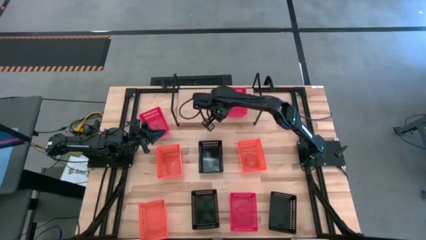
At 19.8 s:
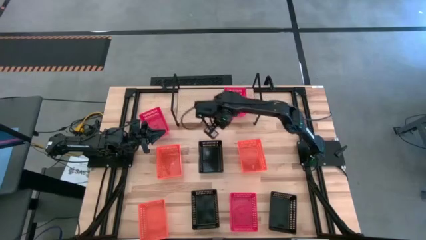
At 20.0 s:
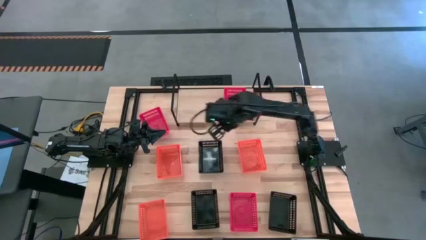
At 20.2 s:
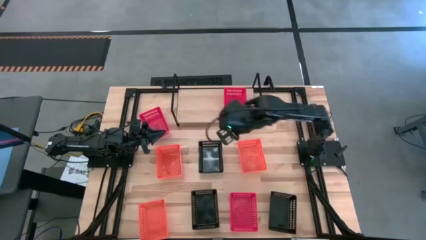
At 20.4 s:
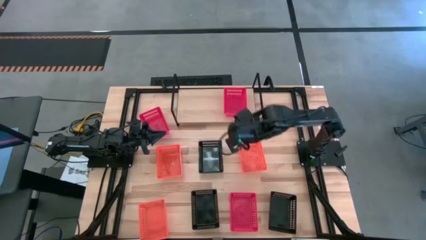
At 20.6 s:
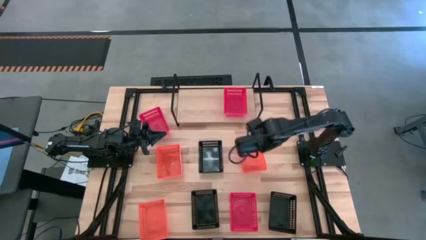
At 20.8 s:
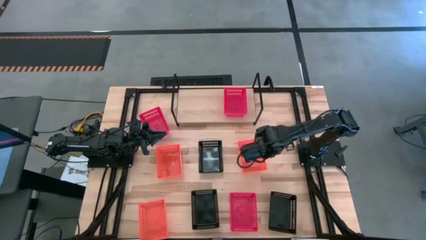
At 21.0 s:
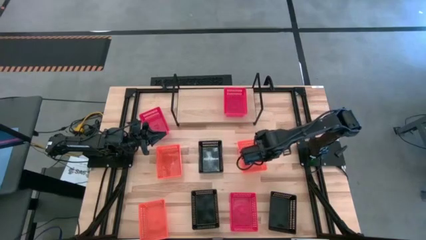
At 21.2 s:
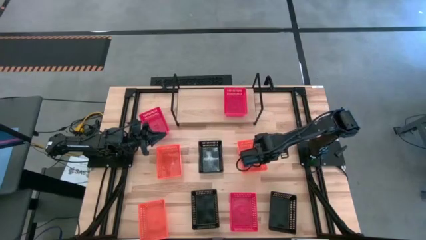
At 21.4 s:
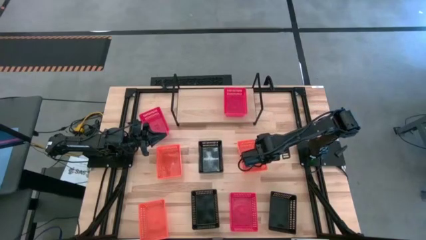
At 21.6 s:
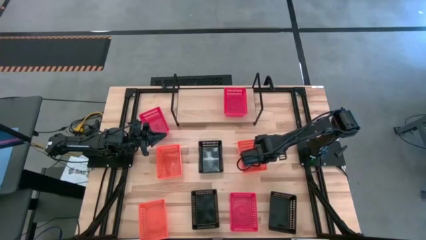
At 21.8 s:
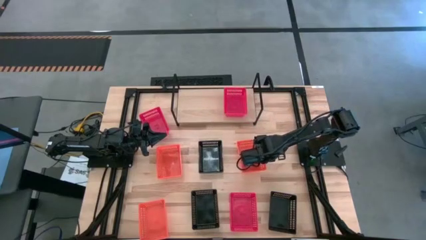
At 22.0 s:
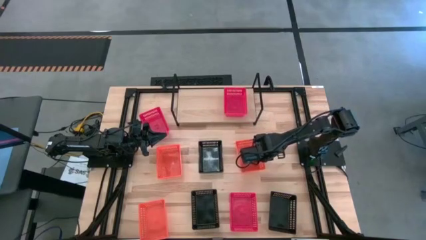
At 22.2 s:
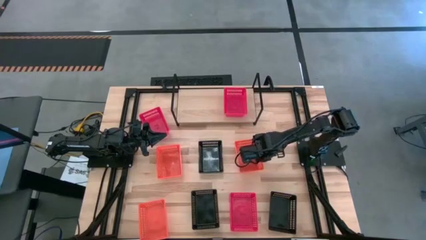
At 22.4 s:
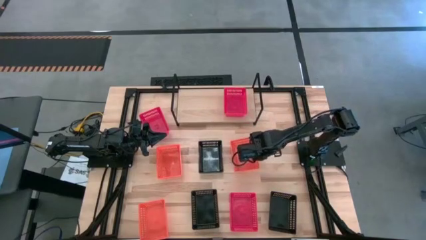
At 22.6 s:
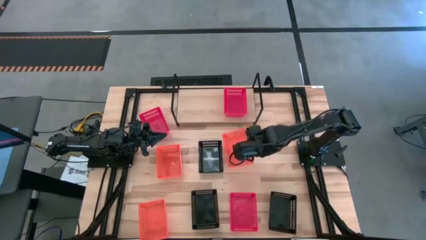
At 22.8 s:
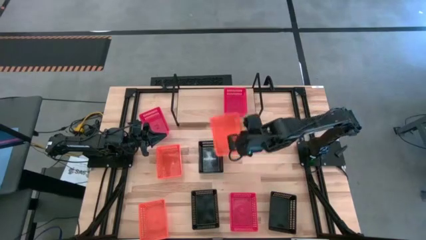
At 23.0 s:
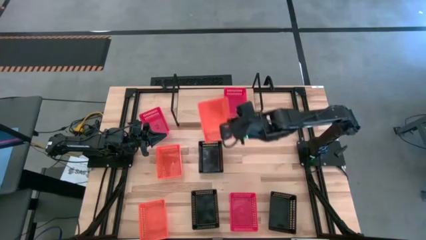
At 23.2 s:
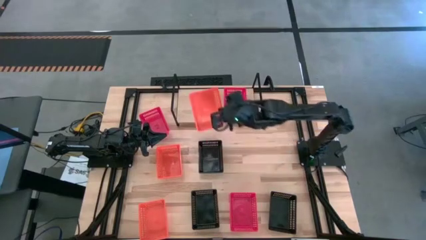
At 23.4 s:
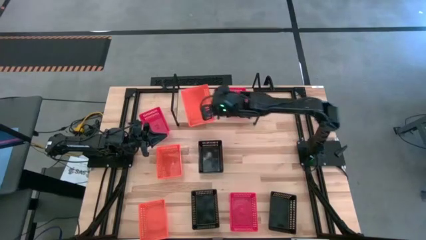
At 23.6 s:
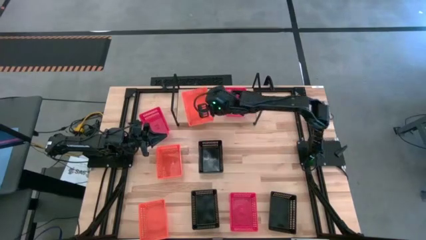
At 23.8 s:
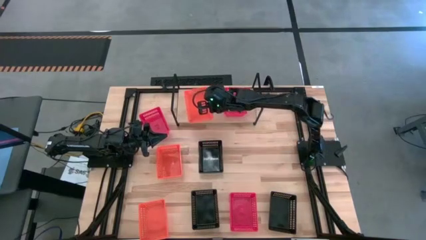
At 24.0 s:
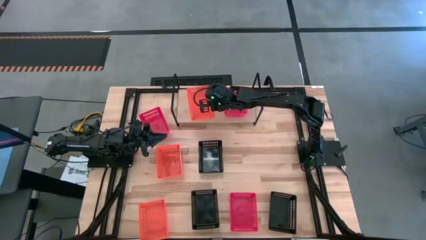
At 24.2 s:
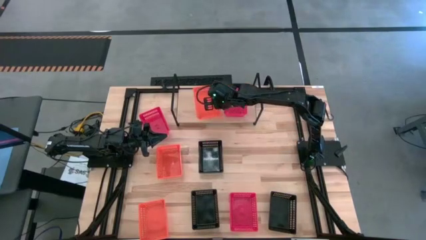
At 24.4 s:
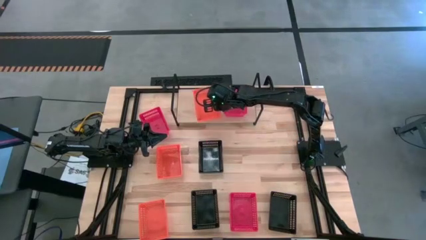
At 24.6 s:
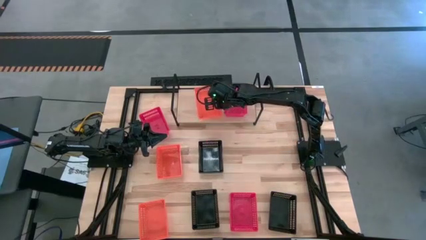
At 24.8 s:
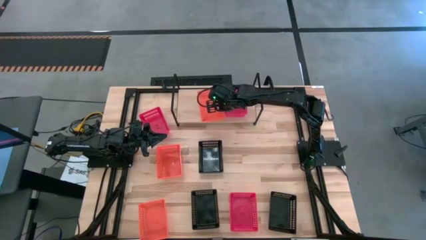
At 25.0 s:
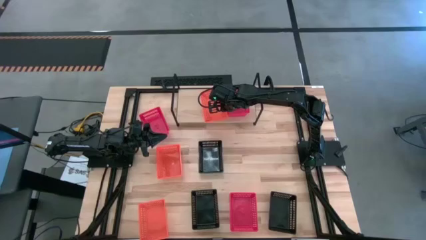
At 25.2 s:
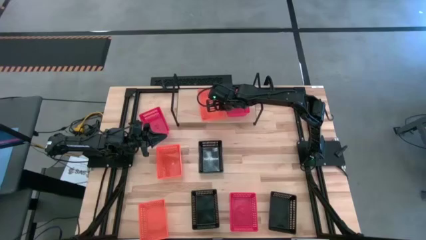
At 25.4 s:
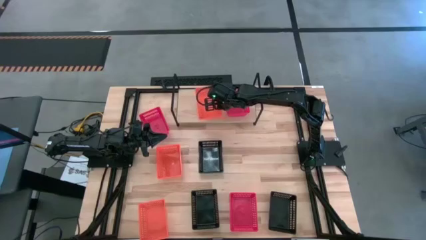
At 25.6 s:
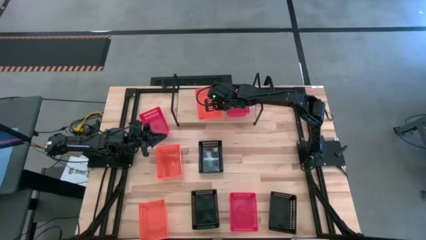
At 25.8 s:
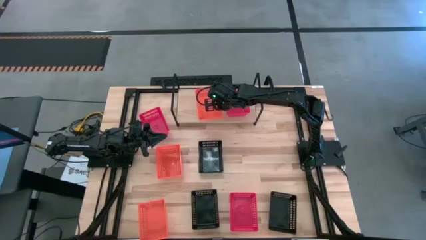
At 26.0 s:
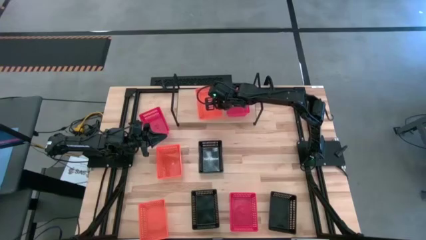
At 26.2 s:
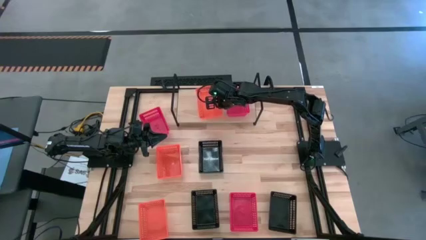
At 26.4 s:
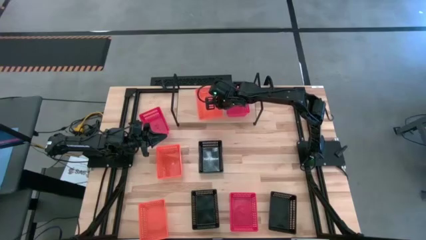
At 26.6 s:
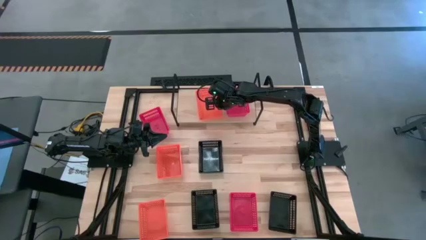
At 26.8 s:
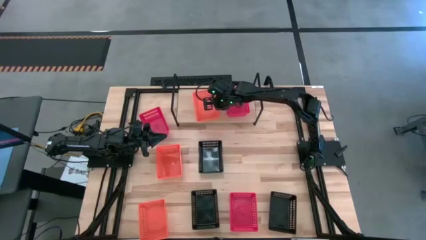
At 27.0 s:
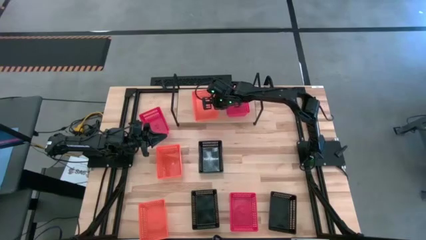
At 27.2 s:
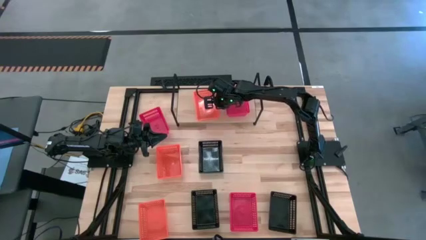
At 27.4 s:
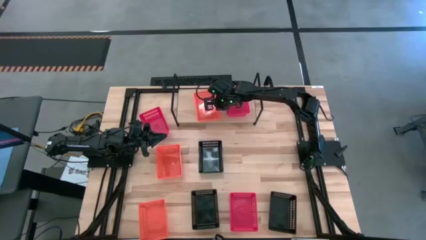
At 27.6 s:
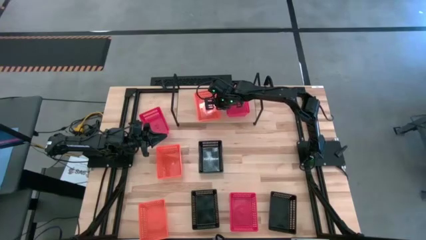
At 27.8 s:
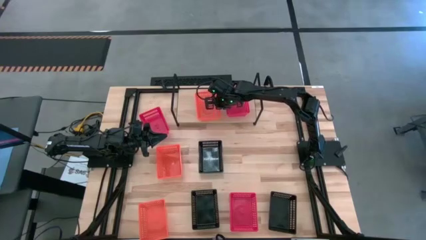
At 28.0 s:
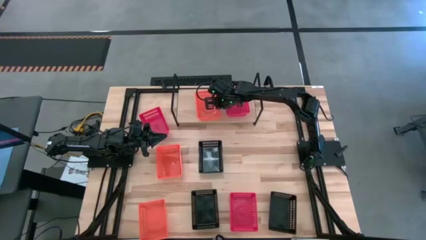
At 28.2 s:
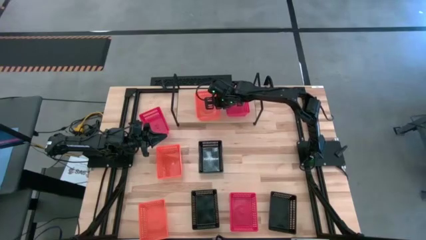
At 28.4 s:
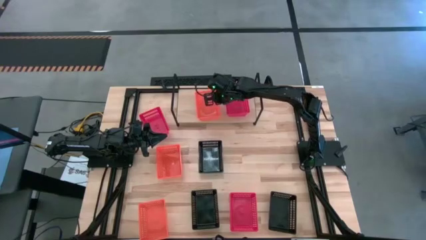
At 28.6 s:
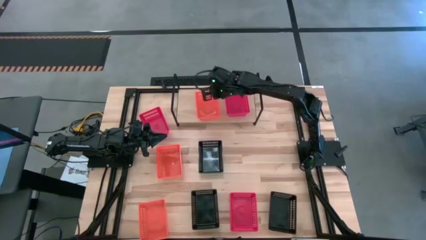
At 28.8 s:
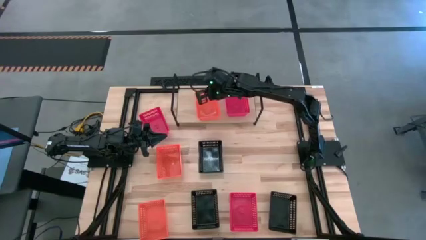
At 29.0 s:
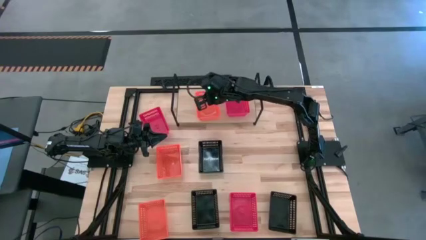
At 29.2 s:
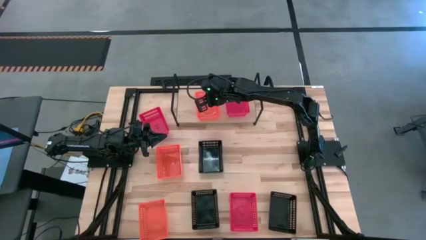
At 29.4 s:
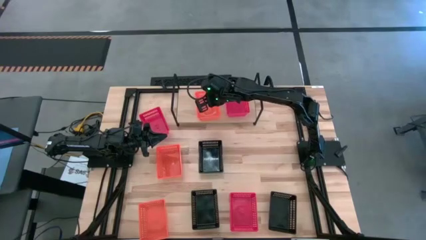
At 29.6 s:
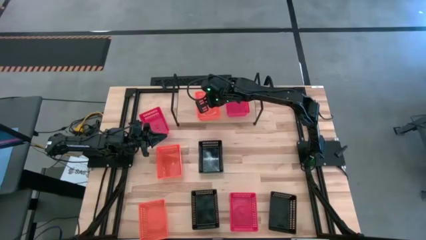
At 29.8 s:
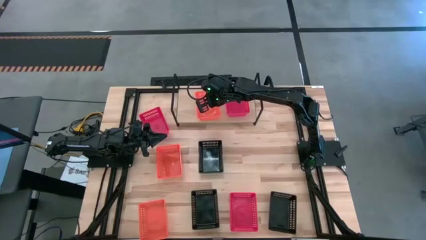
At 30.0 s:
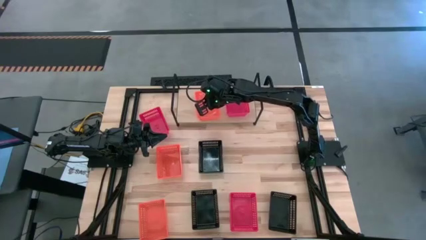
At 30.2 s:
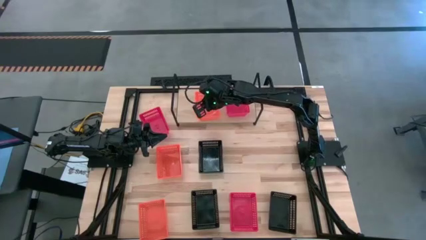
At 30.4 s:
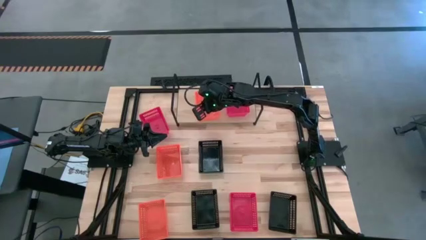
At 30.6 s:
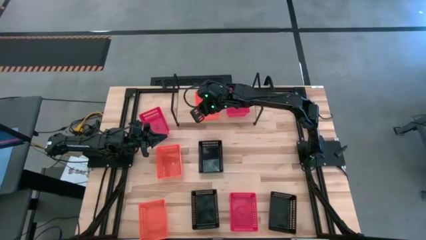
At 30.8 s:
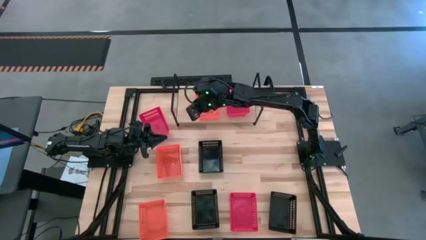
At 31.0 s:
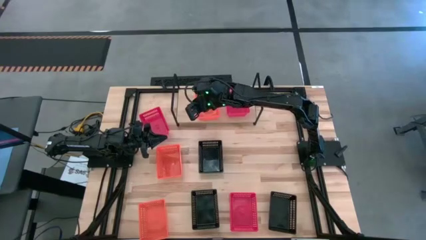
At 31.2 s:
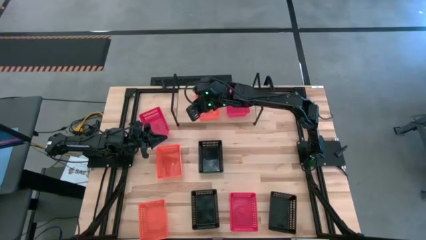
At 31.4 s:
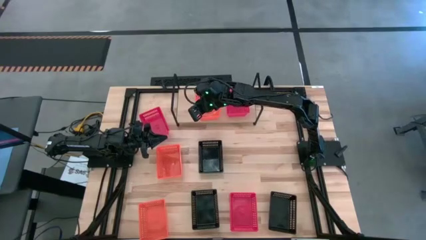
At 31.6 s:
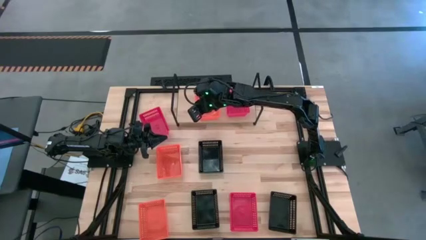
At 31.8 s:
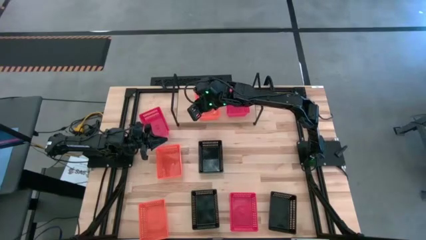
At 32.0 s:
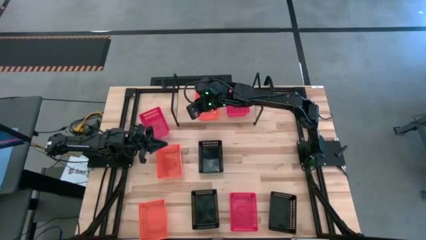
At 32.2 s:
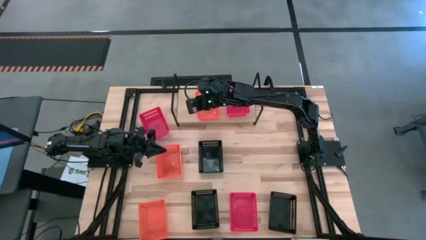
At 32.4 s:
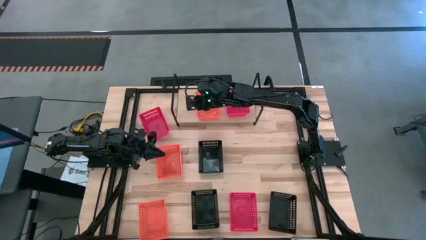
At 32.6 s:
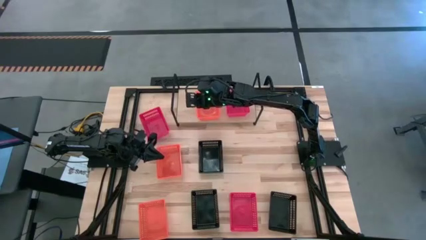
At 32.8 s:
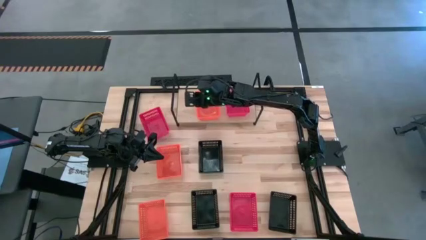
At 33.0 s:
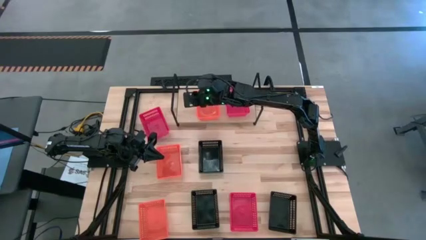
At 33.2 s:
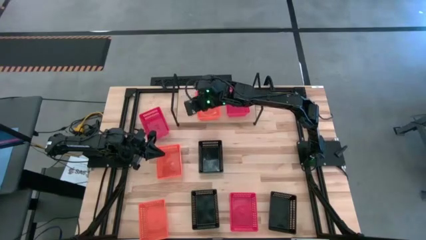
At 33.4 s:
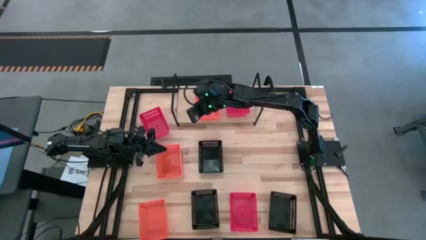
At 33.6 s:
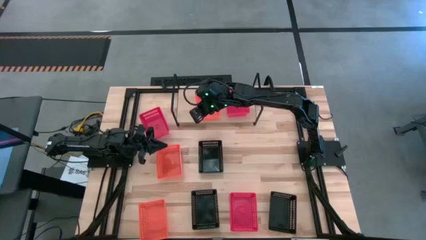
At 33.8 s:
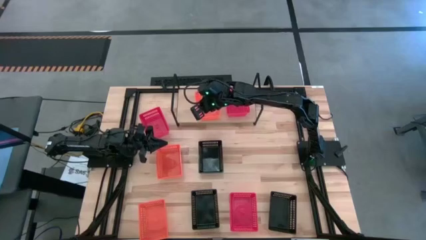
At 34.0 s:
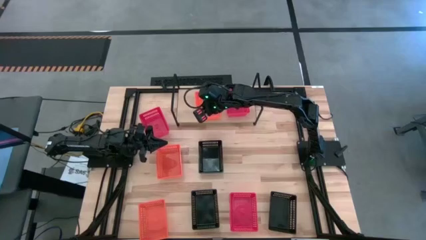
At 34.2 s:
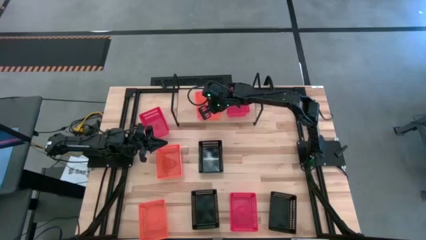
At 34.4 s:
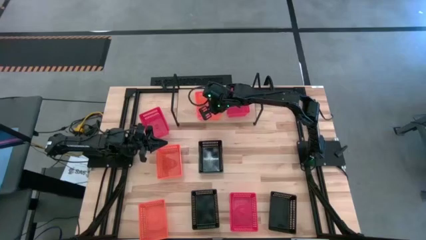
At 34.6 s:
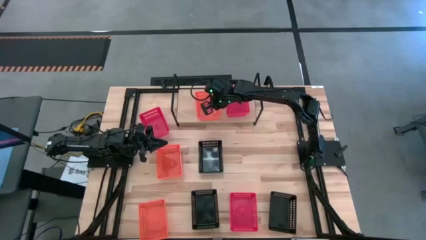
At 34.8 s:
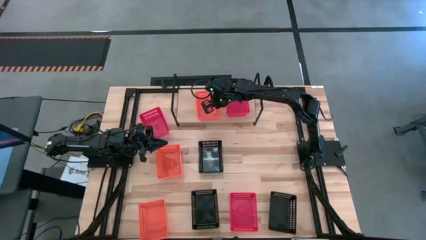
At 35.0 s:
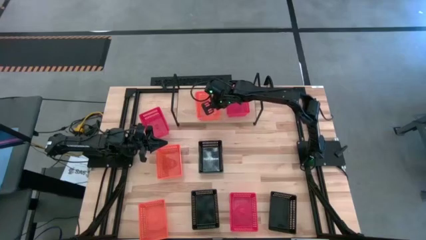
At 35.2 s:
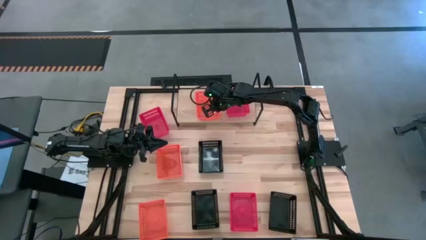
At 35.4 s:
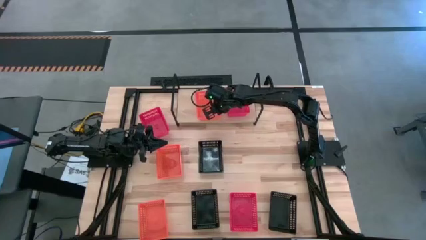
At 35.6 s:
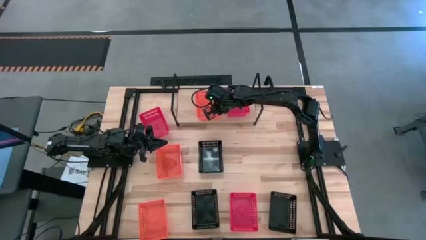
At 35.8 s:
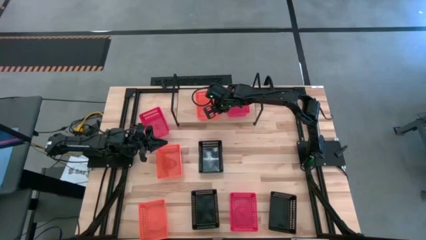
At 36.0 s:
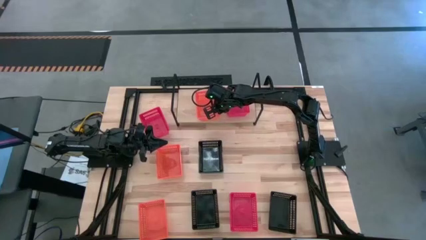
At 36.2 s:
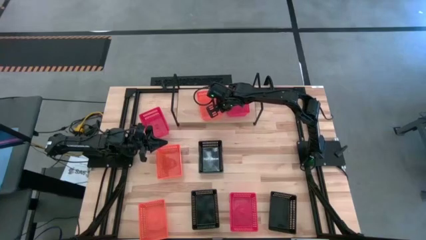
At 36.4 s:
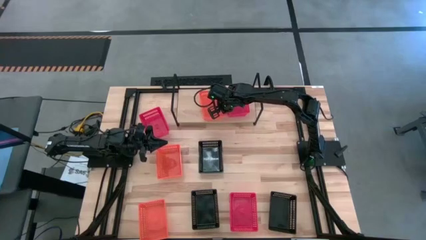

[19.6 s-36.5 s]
Task: Stack baskets on shelf by color
Put the middle right orange bin on the shelf
